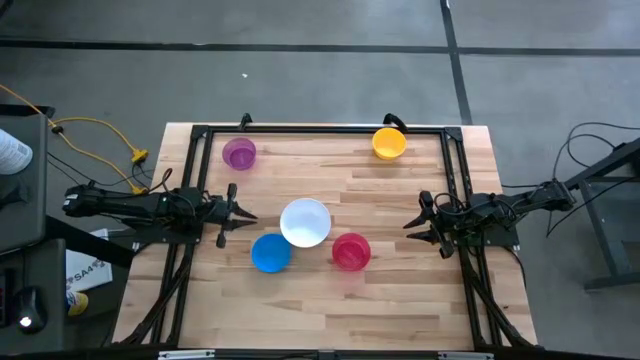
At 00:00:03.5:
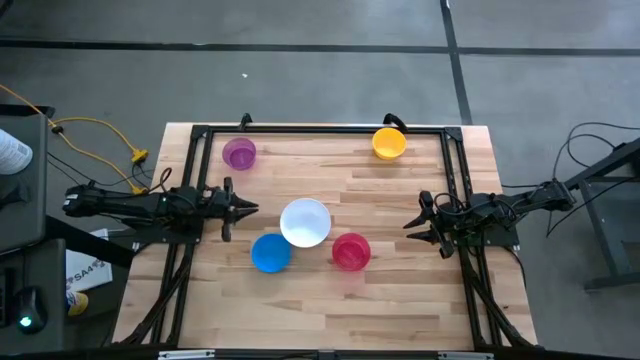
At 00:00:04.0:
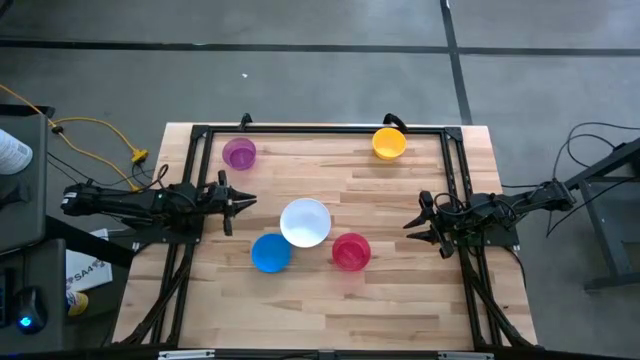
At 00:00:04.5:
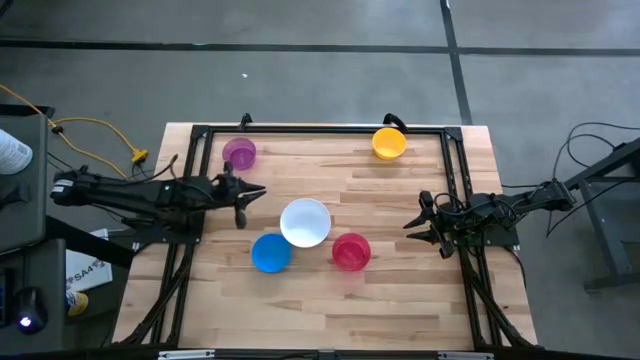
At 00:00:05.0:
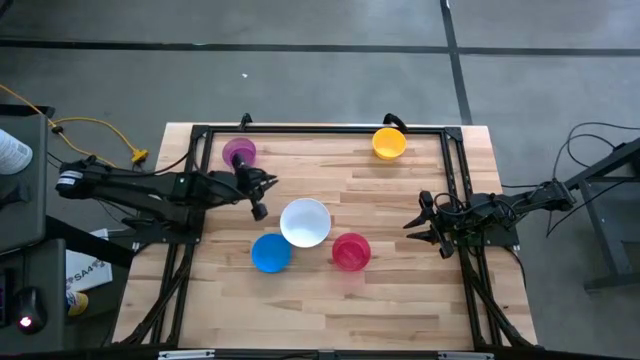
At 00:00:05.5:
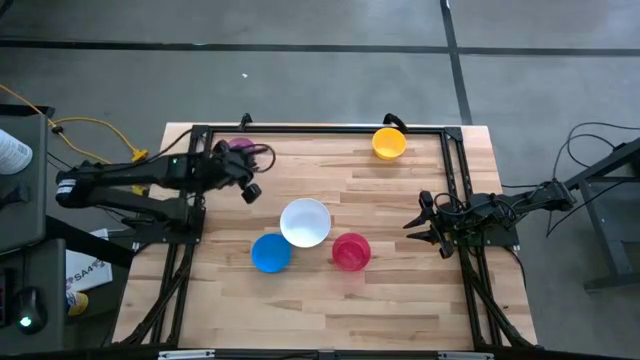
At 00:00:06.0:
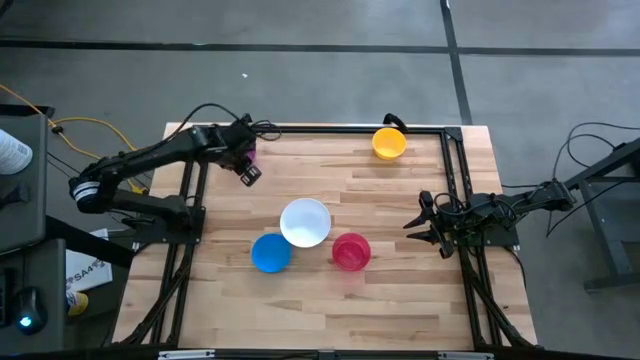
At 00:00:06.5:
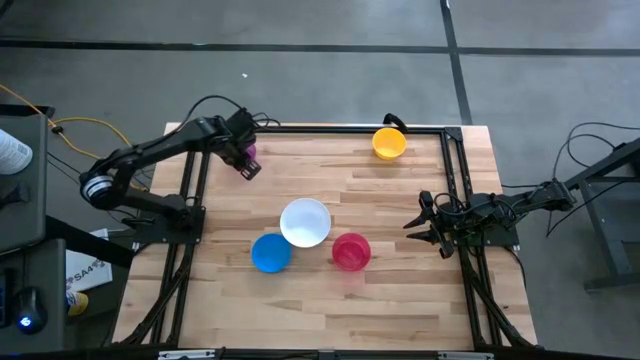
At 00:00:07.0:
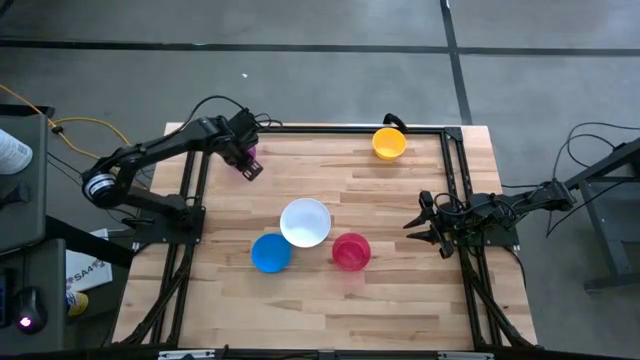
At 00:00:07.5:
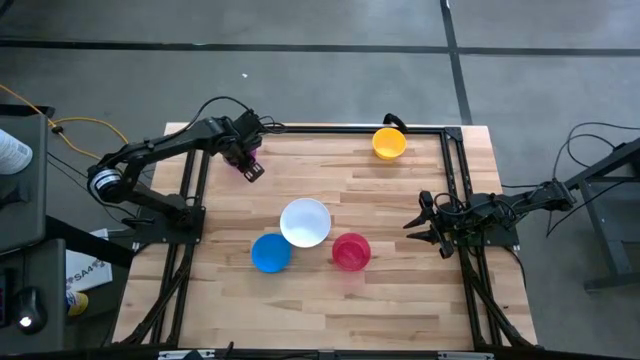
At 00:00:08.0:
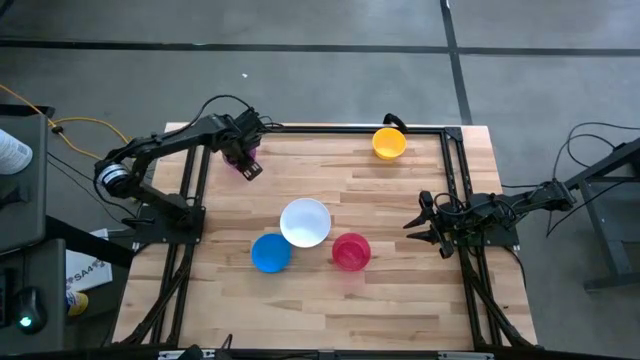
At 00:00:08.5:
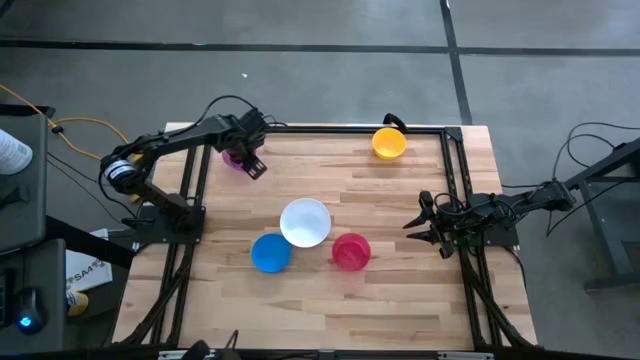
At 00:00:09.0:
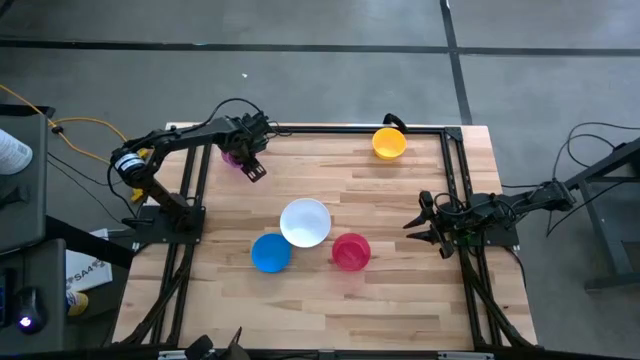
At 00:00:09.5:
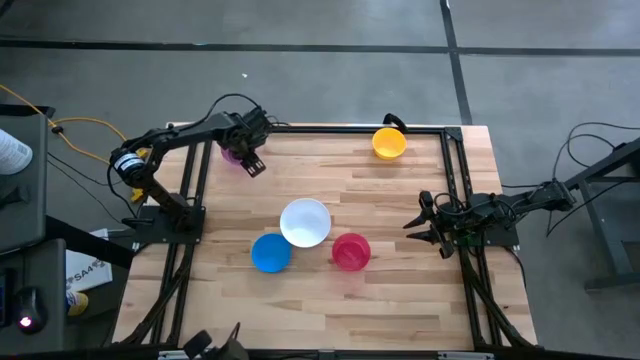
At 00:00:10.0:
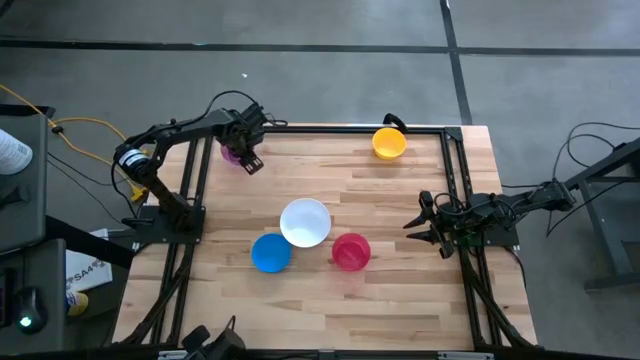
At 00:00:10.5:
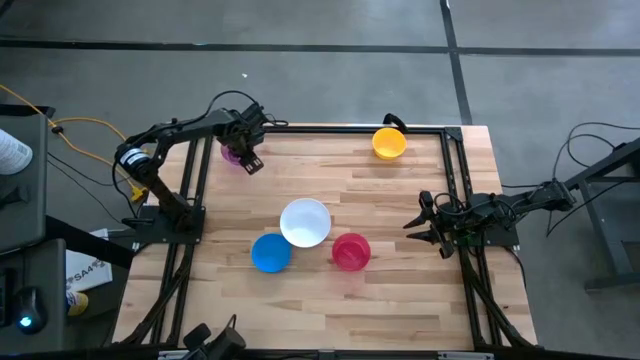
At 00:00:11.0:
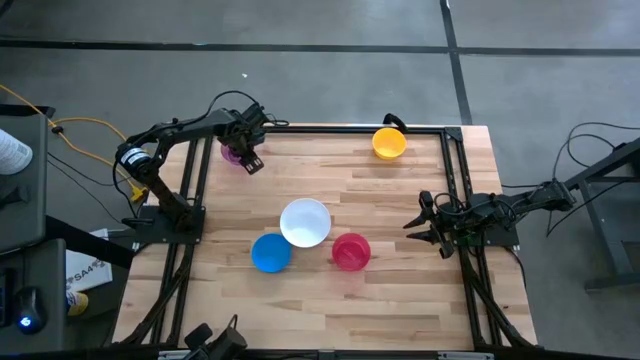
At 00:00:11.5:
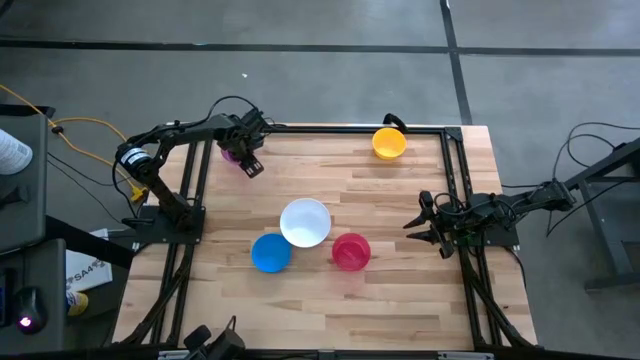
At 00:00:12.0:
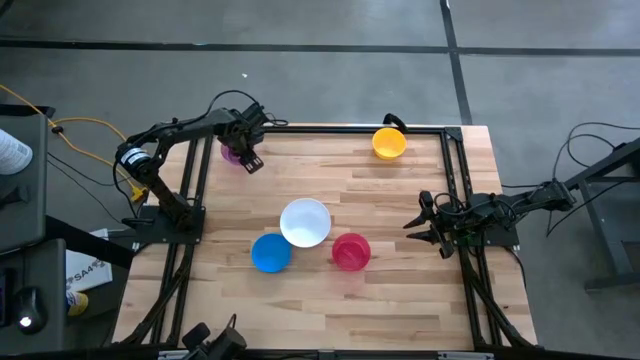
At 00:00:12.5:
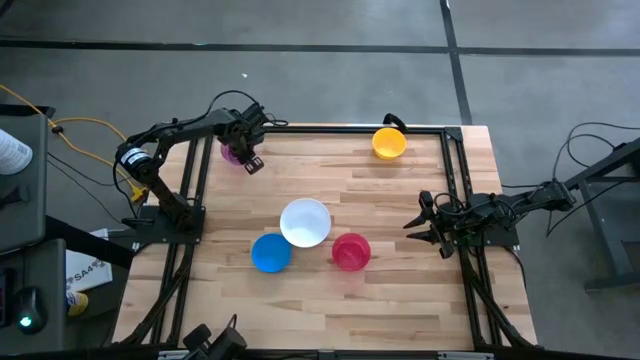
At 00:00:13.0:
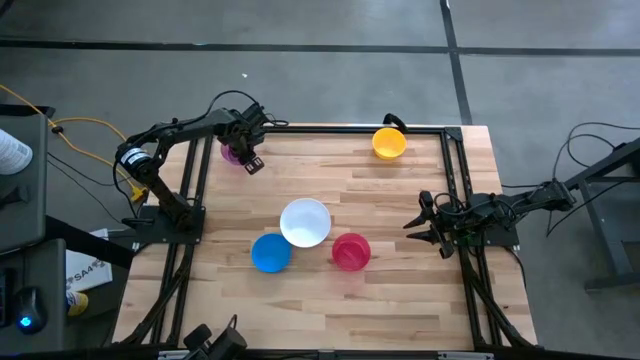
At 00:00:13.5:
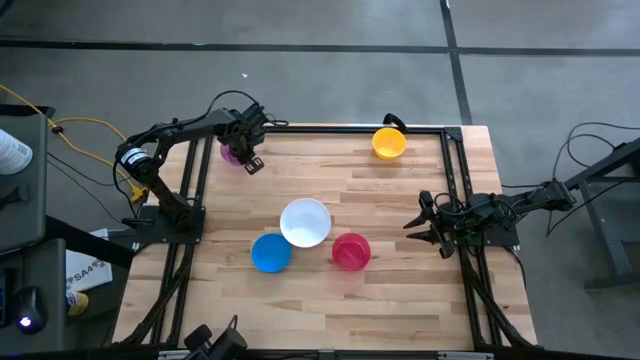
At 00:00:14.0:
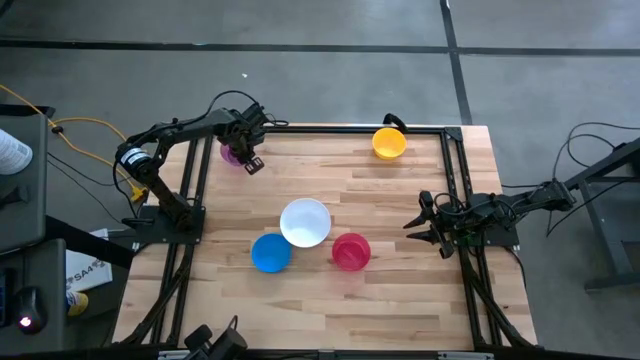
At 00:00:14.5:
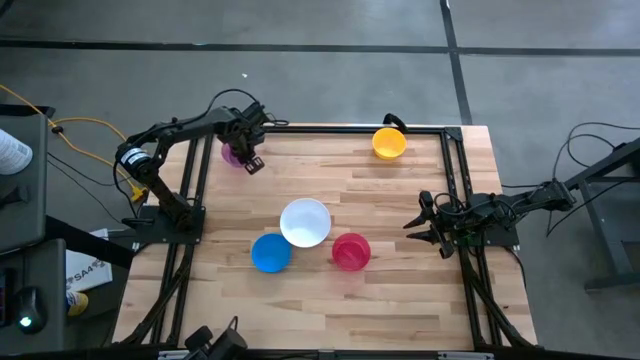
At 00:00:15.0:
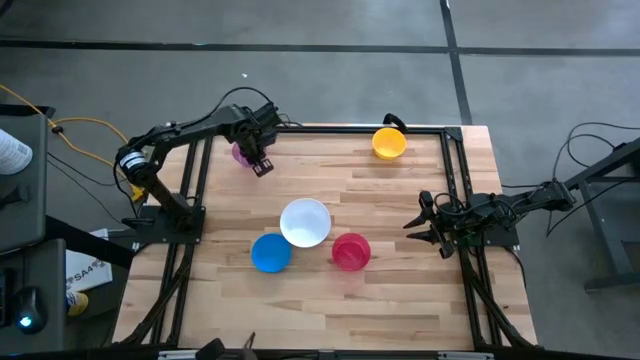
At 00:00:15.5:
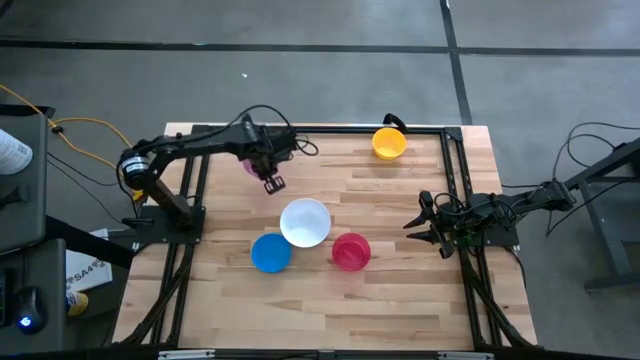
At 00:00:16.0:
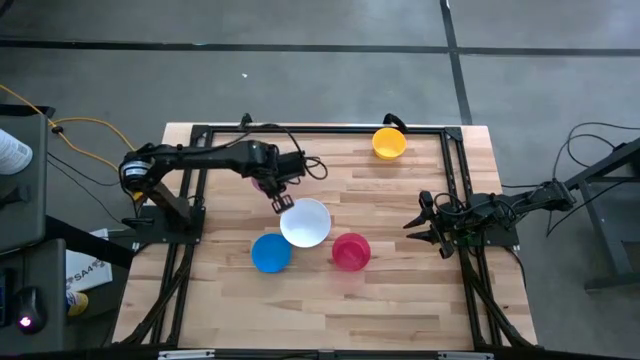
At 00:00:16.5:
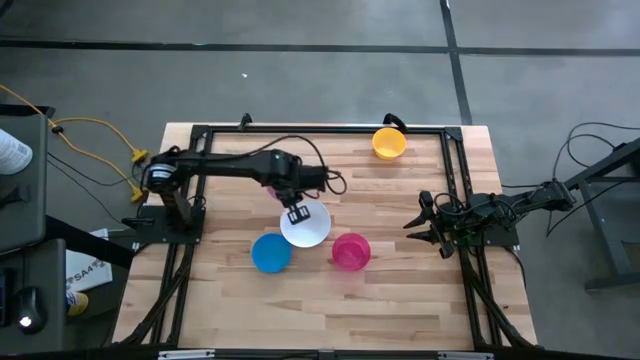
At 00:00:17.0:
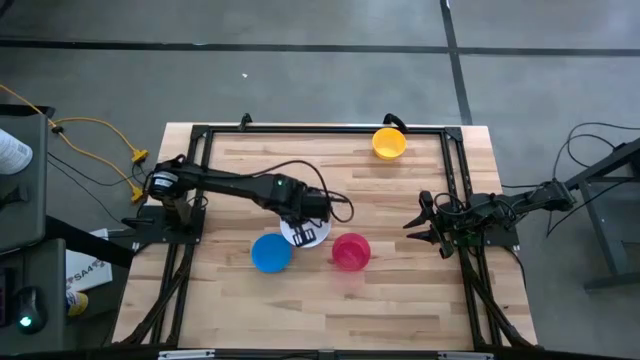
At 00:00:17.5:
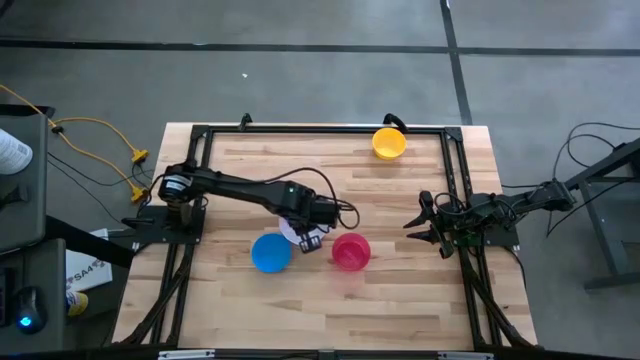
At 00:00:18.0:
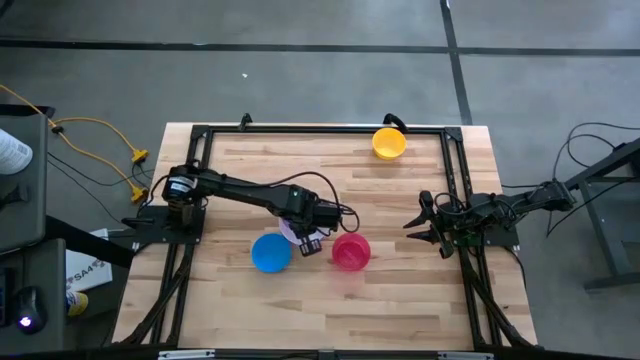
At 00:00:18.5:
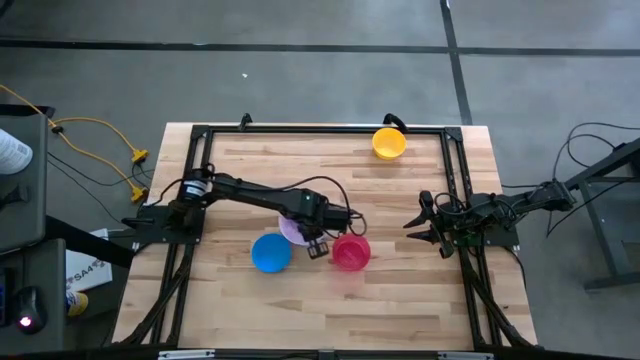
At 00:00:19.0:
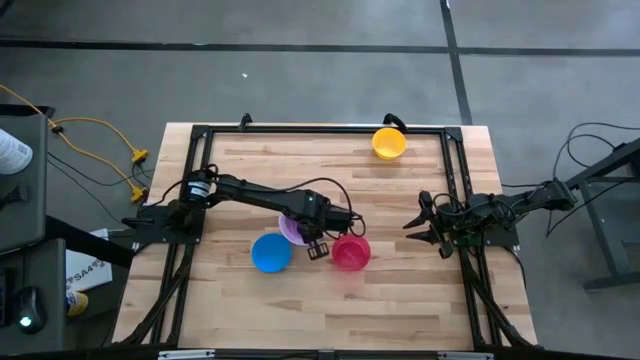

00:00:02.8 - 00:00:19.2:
Stack the violet bowl on top of the white bowl
